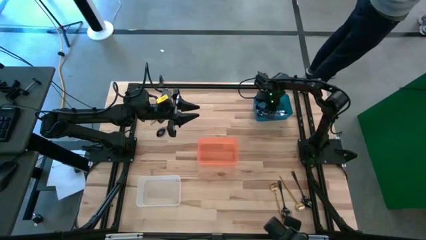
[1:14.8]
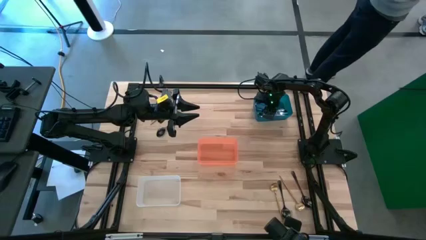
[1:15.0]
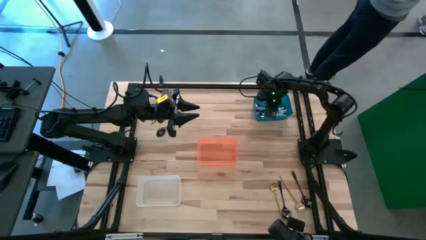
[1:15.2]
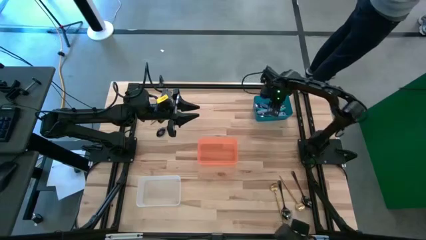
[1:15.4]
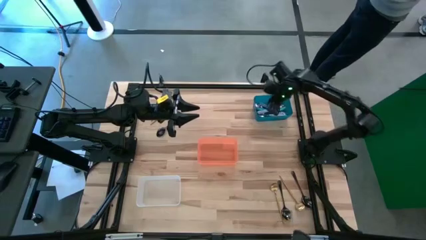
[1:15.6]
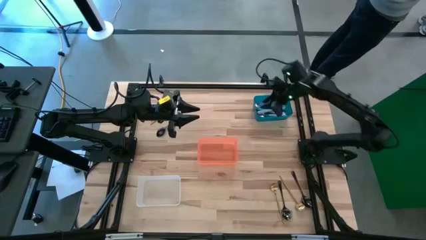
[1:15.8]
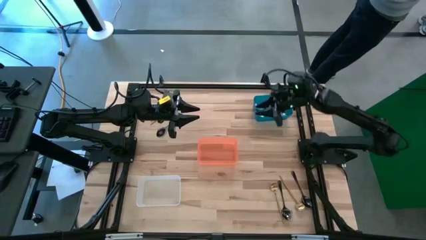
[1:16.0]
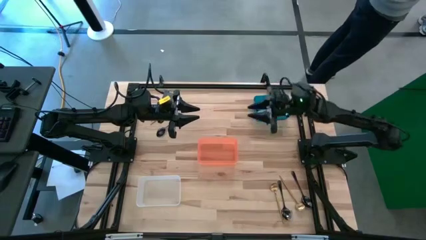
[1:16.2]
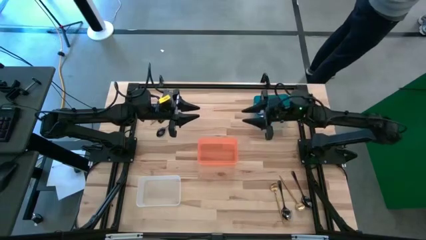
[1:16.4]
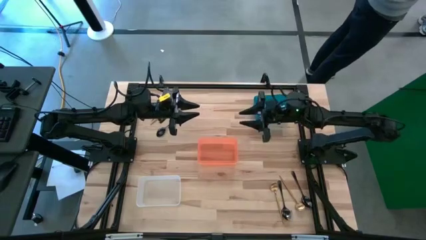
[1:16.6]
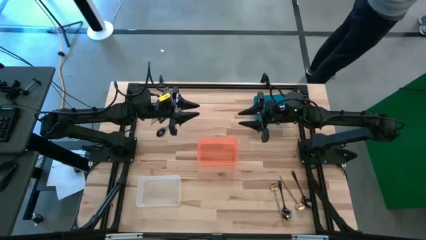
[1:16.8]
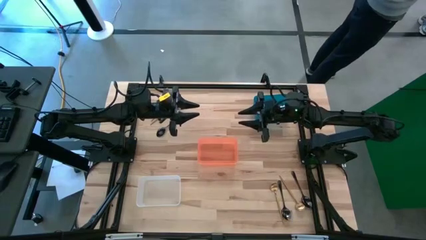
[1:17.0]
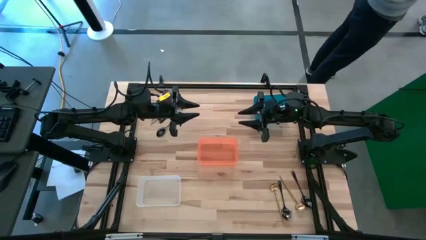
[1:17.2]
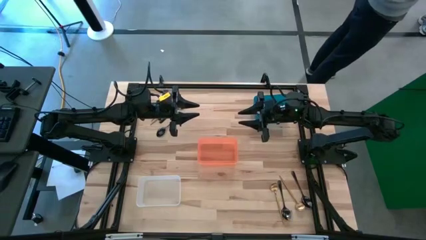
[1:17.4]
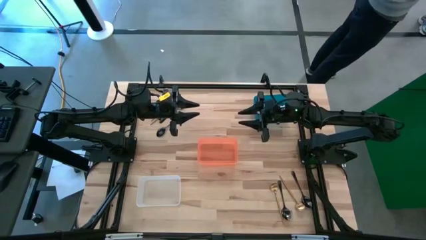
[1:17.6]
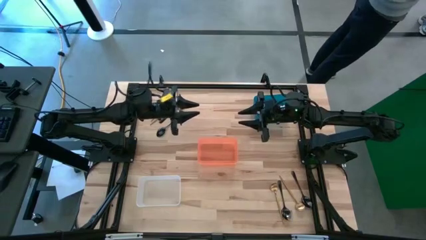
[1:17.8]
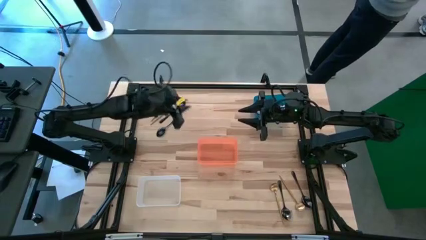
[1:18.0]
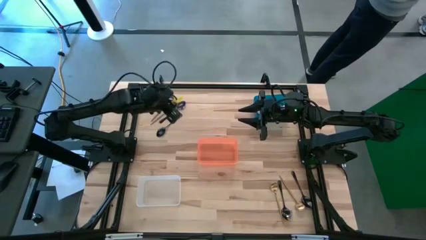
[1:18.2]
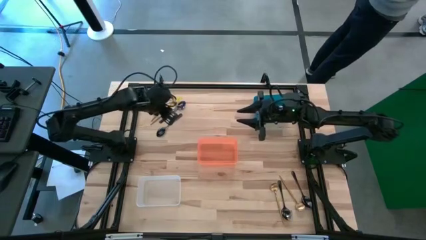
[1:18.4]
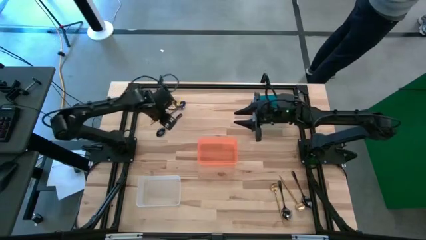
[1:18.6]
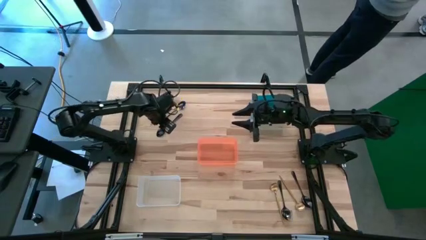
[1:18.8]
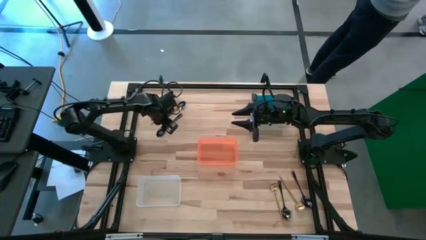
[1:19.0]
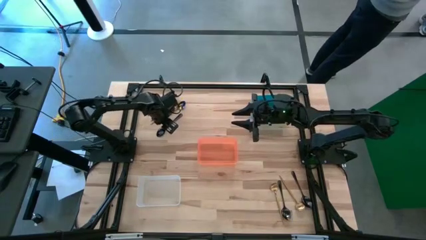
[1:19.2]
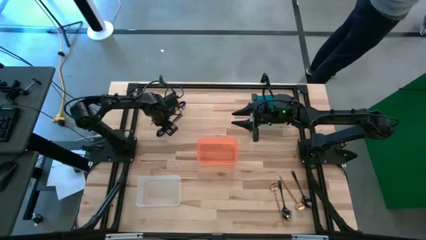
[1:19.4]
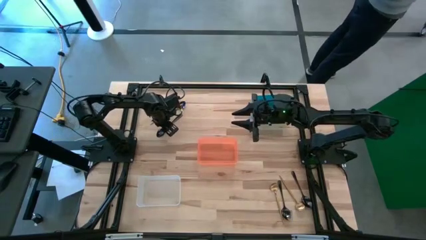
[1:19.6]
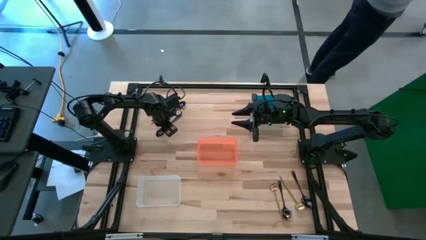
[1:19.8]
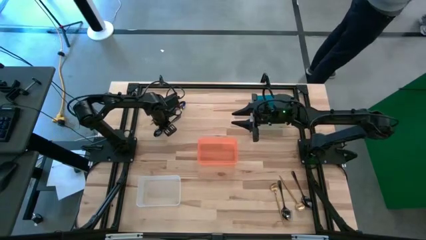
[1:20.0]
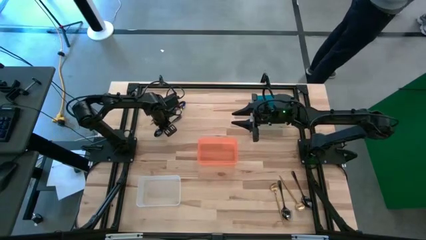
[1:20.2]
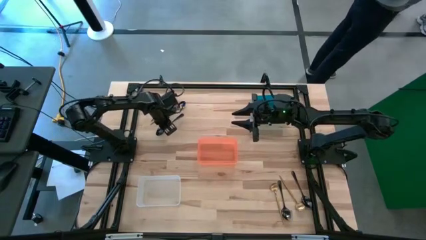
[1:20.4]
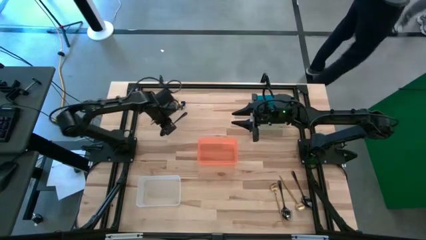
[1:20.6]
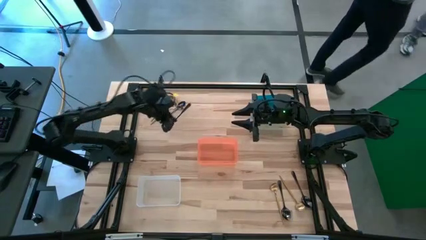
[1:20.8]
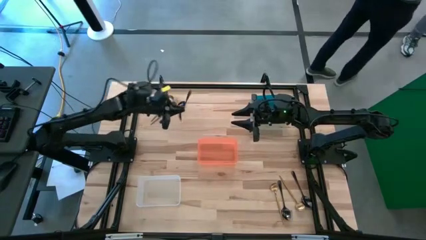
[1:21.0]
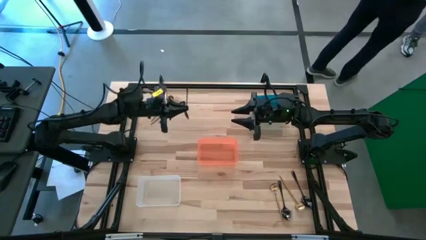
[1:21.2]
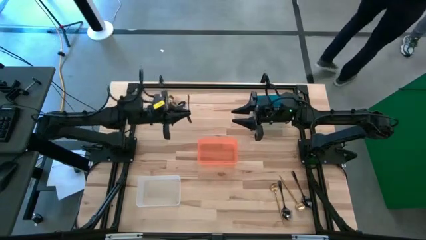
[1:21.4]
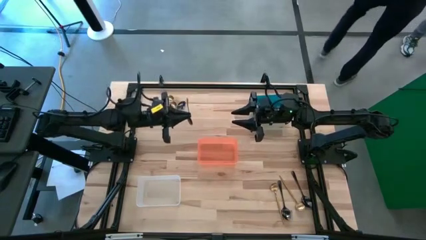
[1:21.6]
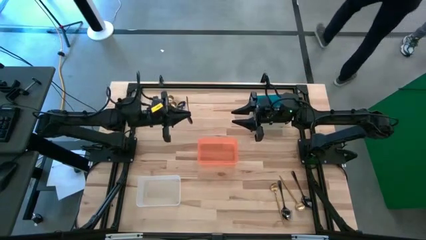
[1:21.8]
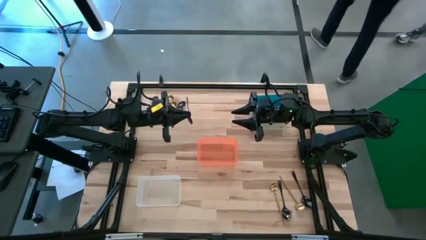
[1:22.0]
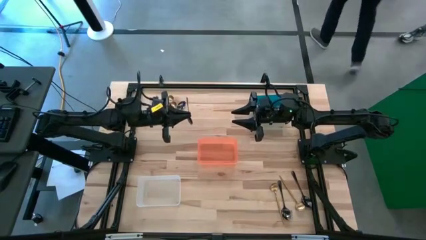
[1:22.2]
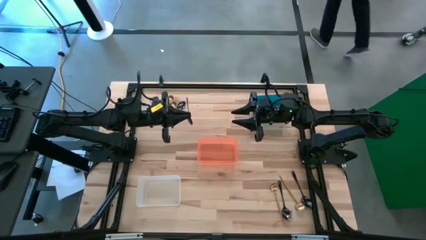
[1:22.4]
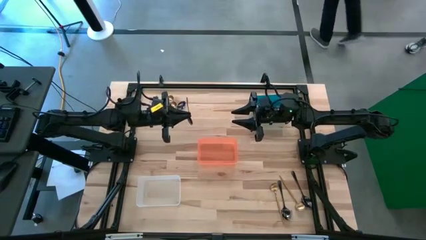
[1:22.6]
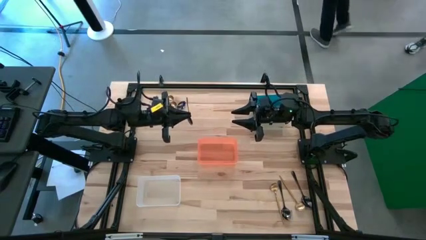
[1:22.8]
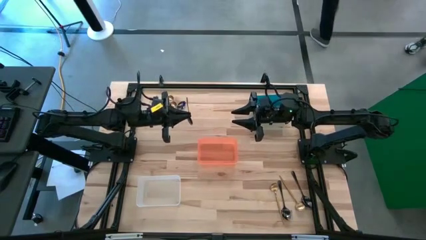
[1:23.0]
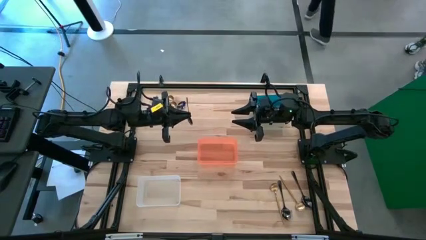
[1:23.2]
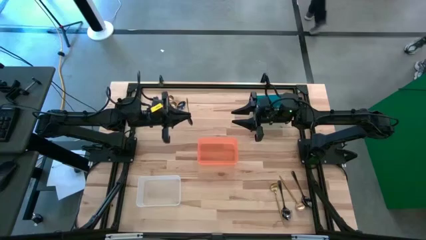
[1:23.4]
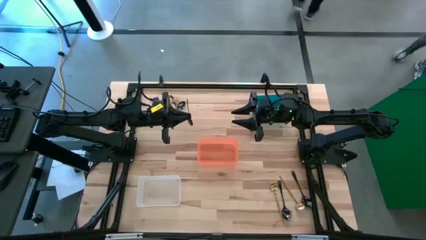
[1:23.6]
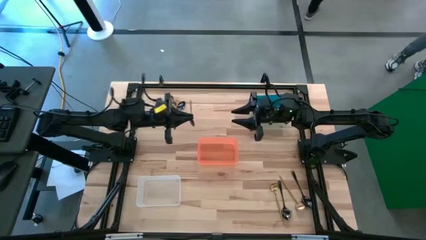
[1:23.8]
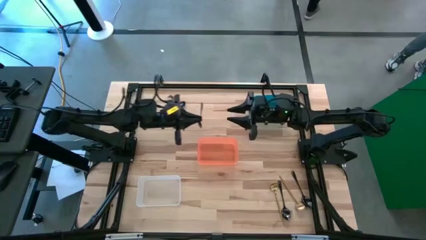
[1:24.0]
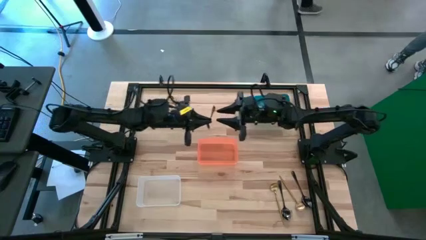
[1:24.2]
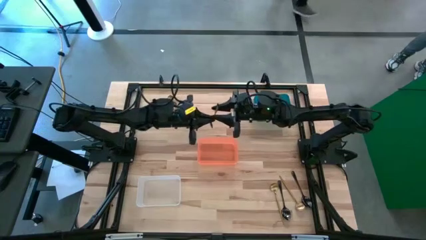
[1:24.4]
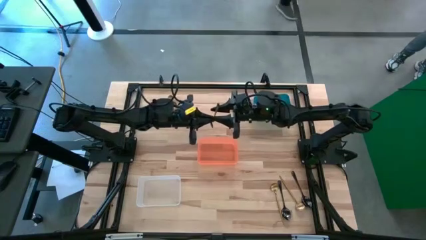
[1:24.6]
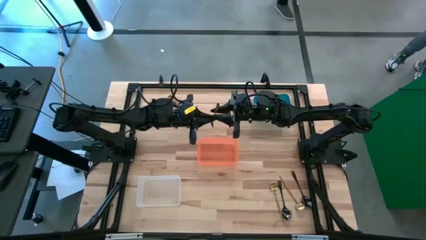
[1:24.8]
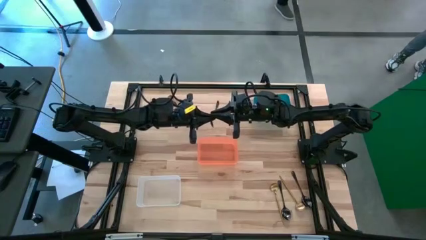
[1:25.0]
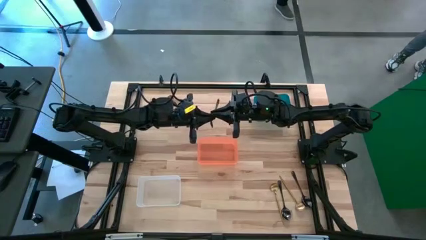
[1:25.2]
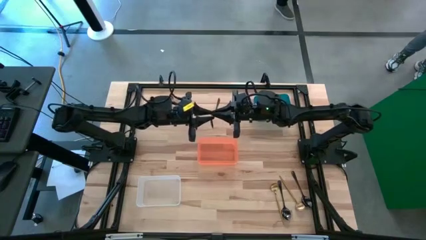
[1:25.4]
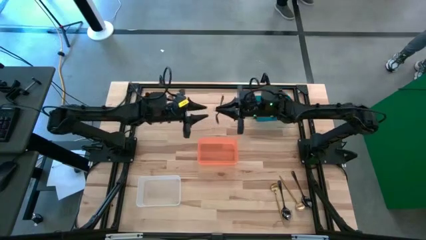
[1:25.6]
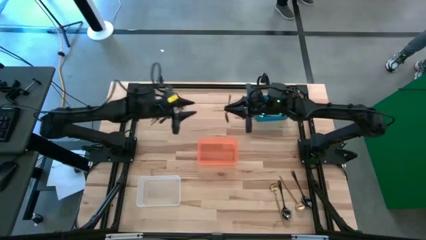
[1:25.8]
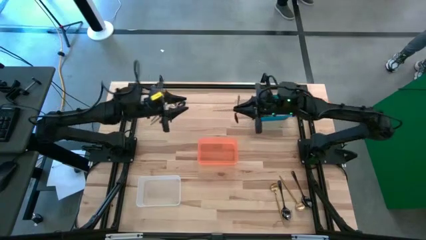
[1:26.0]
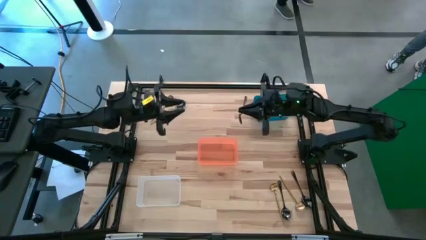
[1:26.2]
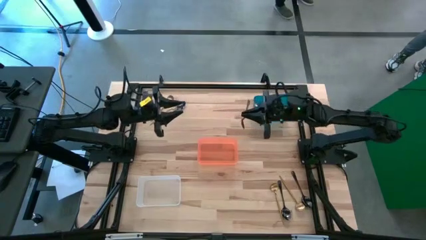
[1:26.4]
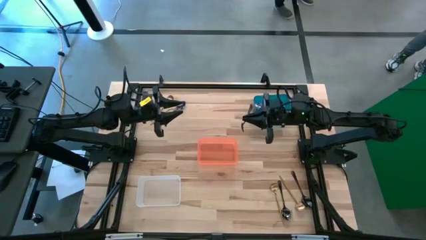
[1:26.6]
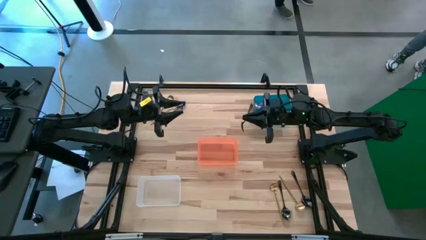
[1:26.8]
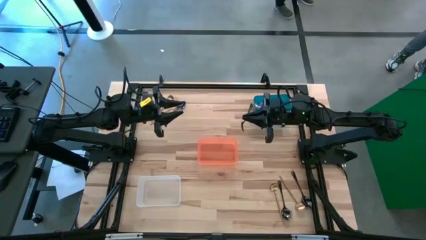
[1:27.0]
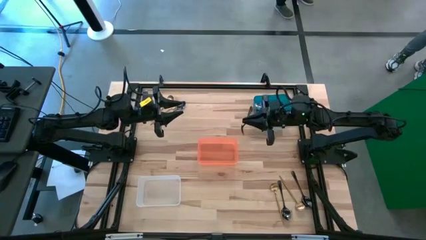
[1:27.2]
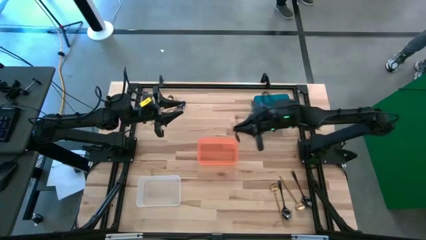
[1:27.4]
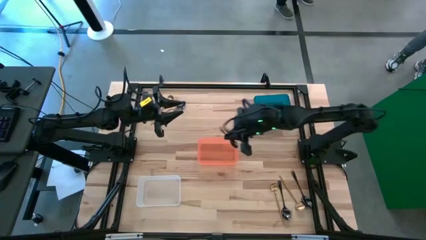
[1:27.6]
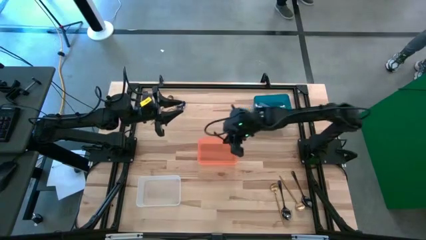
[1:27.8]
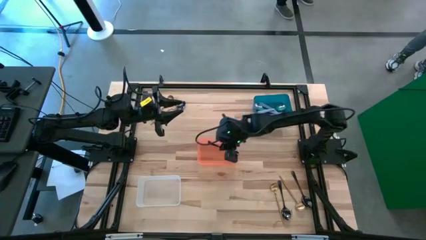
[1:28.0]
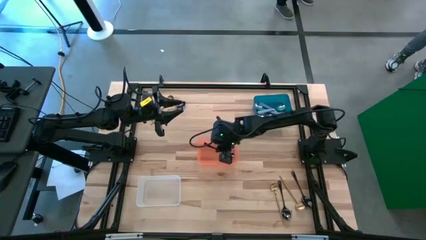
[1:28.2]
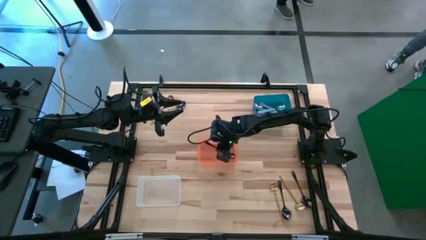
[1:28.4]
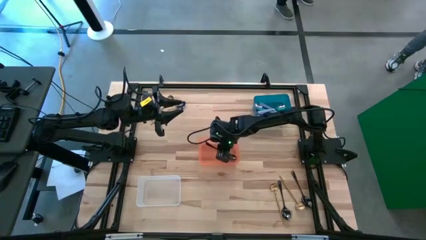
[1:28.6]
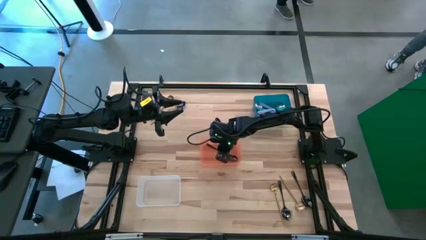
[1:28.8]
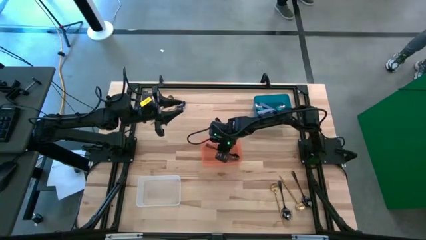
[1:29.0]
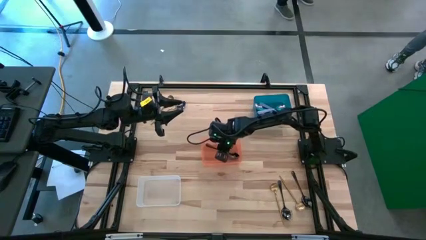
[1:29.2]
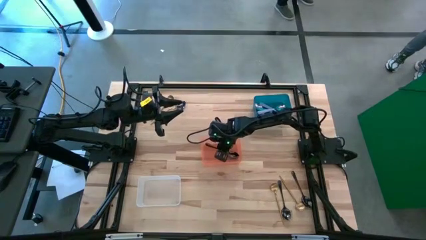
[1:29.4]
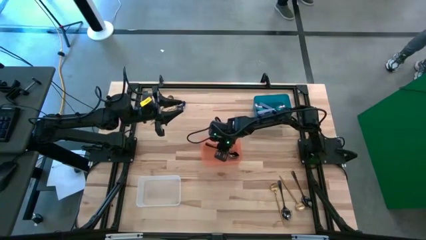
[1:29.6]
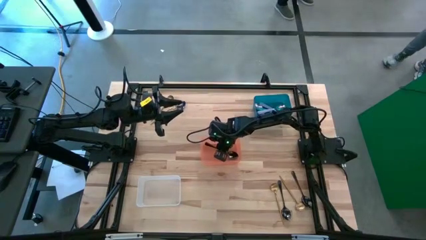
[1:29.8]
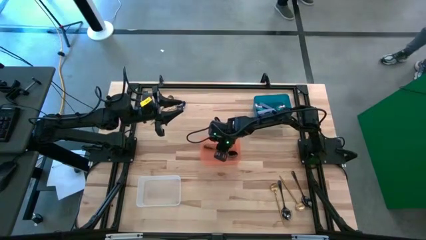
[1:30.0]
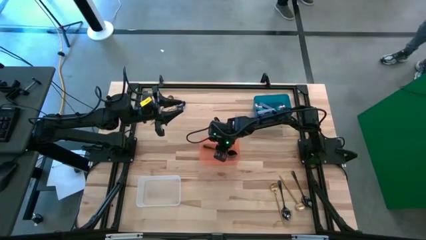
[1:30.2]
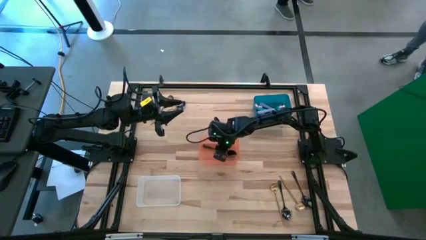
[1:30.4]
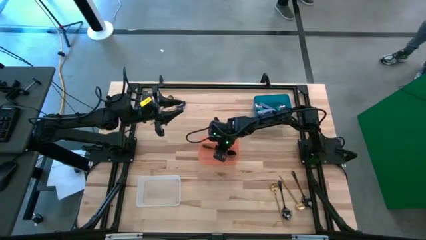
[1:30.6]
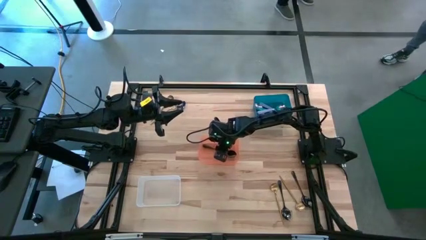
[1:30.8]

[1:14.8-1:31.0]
Task: Sort silverware by color (type)
Put the top right black spoon into the orange bin

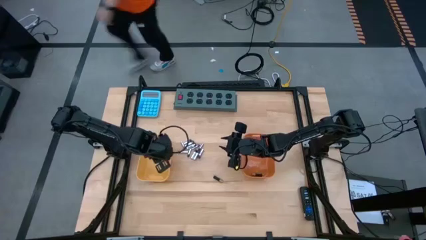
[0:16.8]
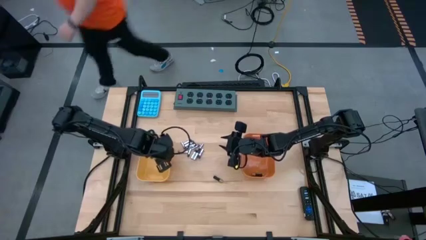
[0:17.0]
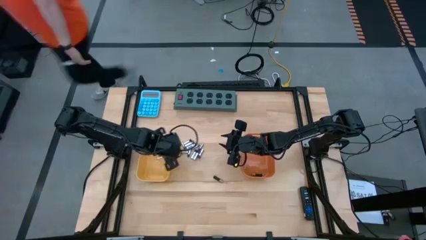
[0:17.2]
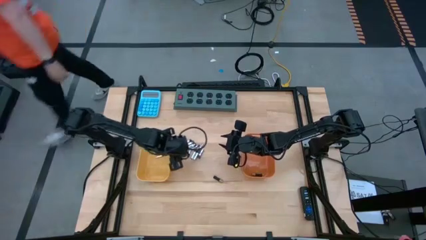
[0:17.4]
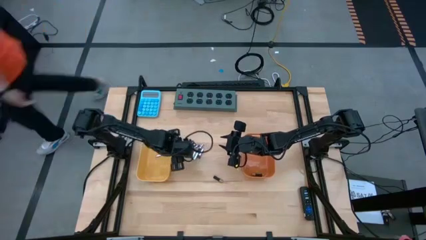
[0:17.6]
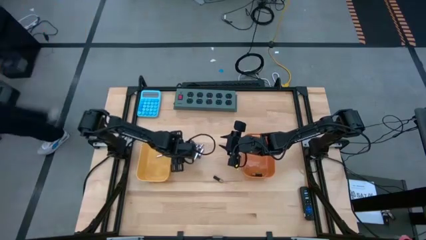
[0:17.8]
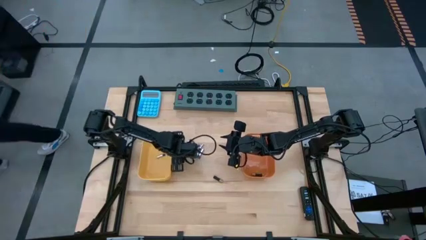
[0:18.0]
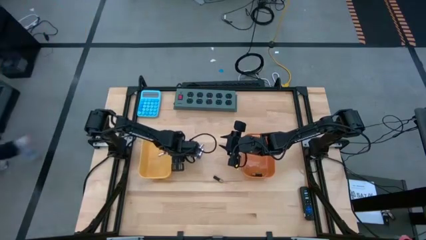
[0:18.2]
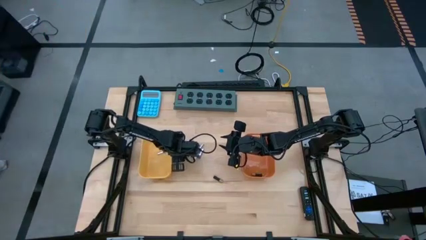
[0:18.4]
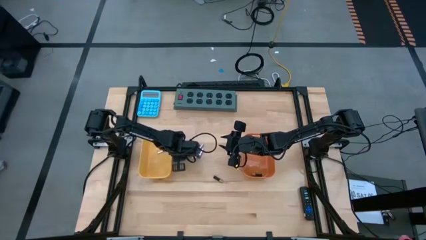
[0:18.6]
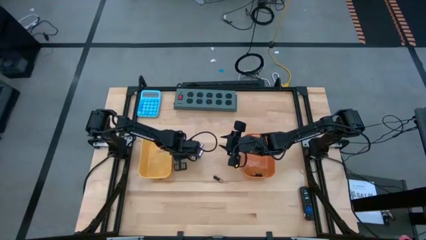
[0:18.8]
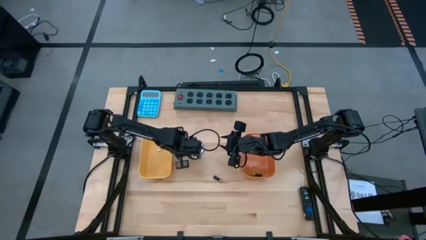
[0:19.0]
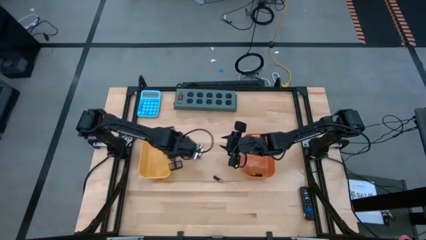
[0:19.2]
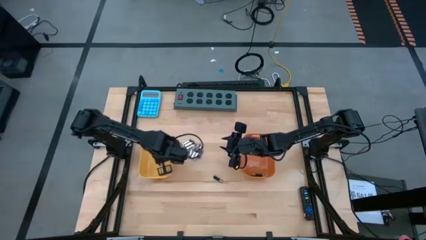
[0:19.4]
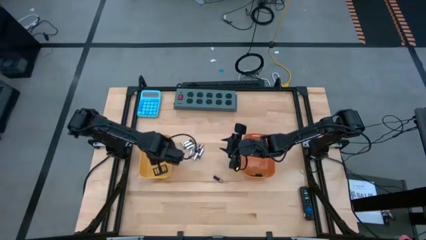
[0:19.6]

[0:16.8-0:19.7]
Task: Sort batteries
Put the silver battery into the yellow bin
